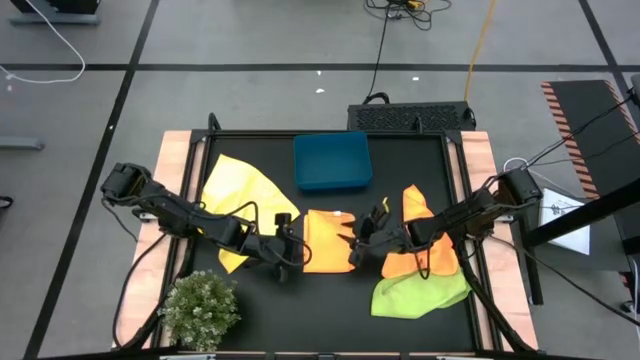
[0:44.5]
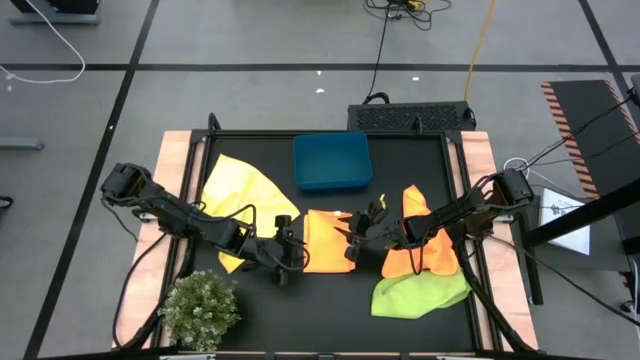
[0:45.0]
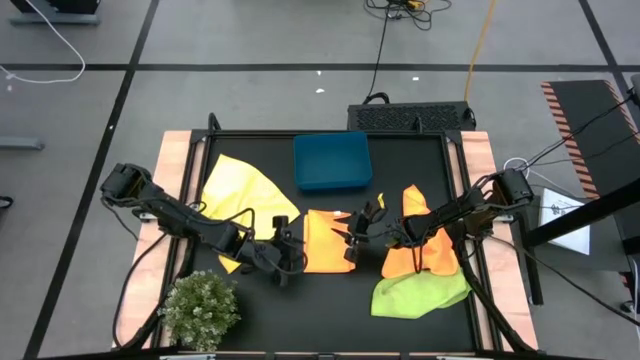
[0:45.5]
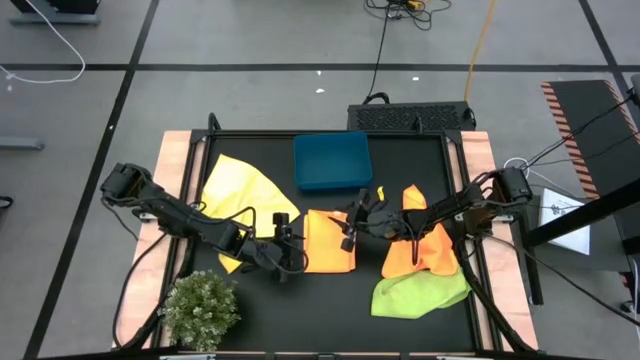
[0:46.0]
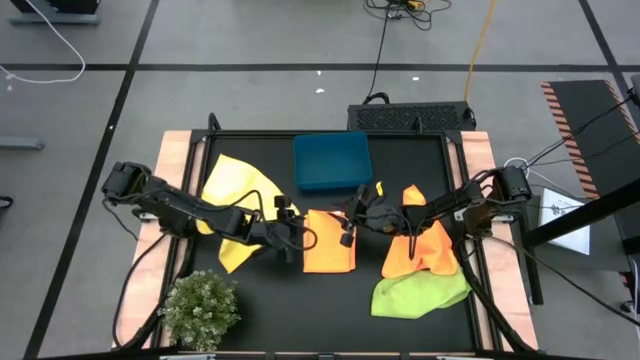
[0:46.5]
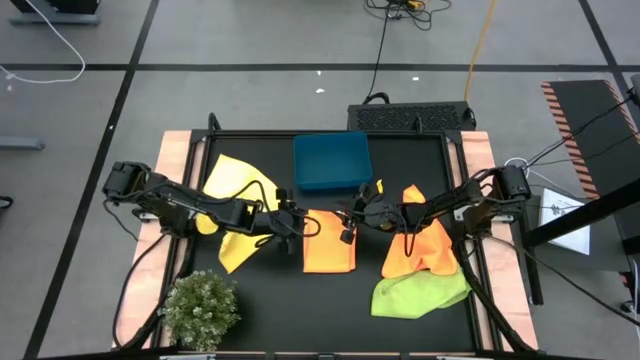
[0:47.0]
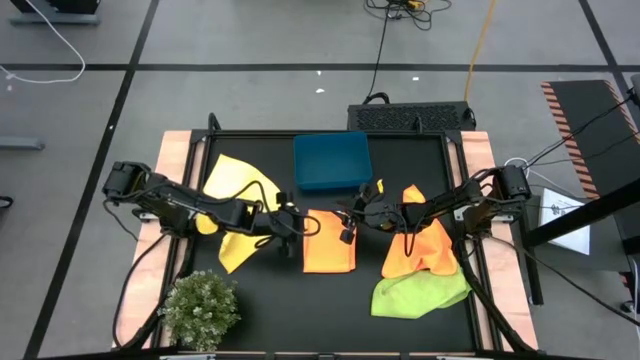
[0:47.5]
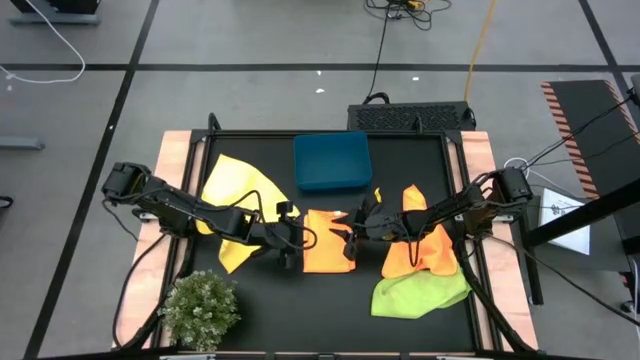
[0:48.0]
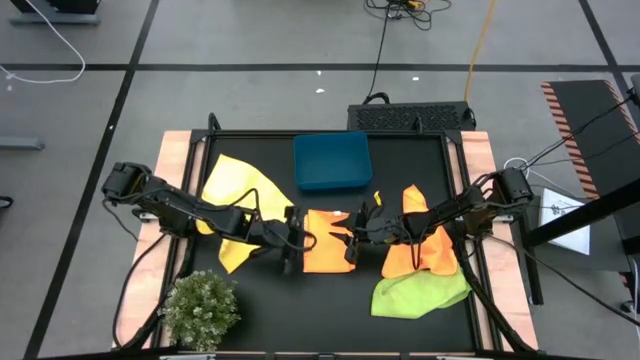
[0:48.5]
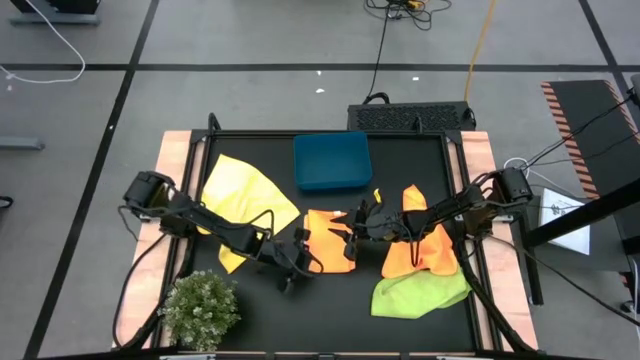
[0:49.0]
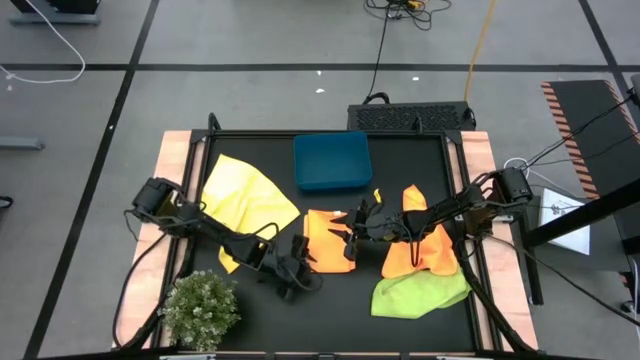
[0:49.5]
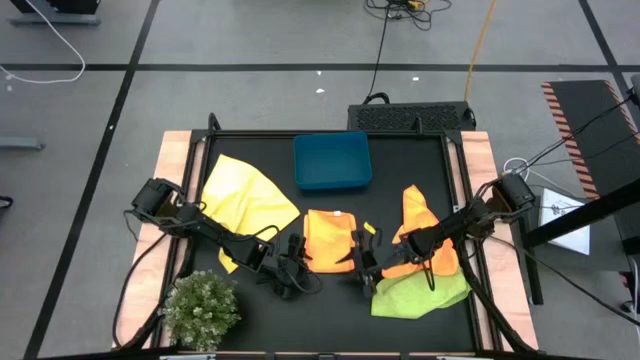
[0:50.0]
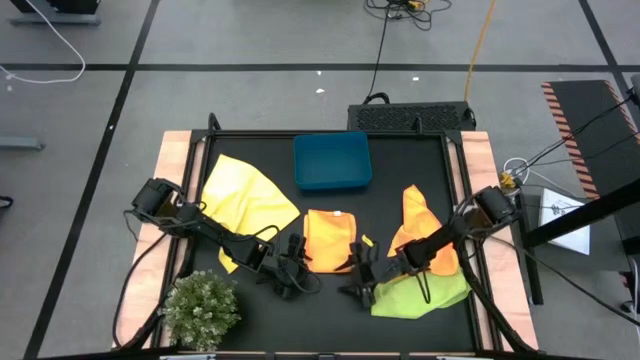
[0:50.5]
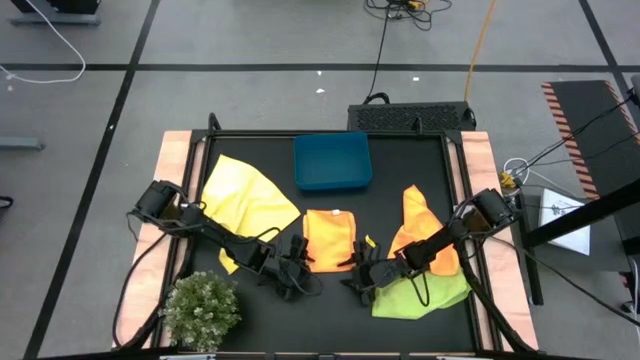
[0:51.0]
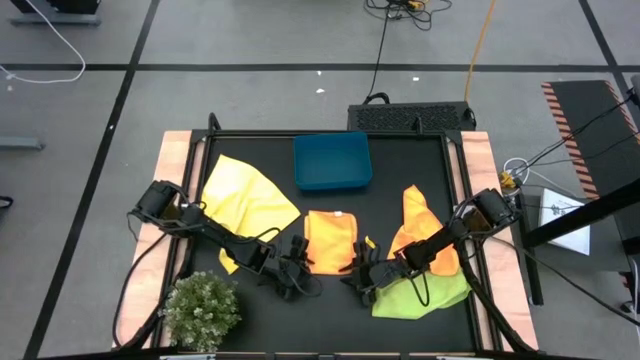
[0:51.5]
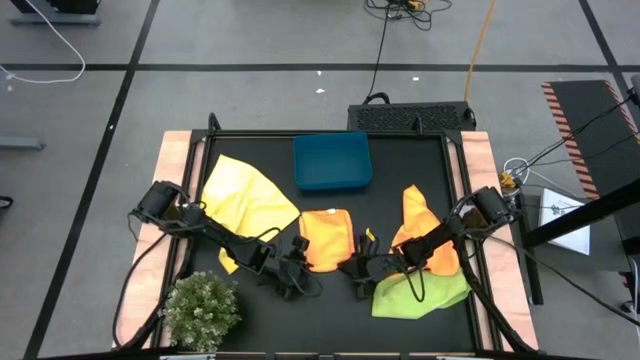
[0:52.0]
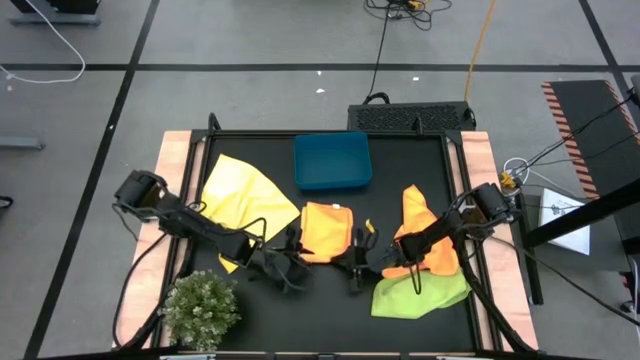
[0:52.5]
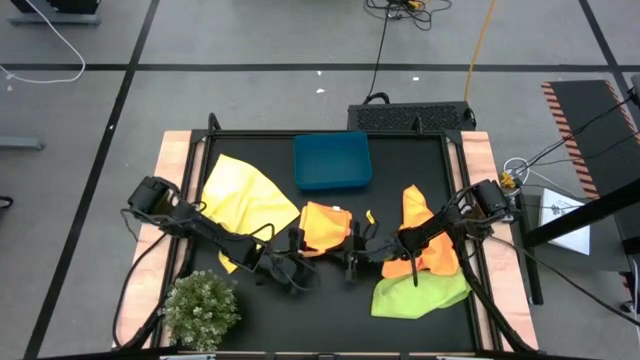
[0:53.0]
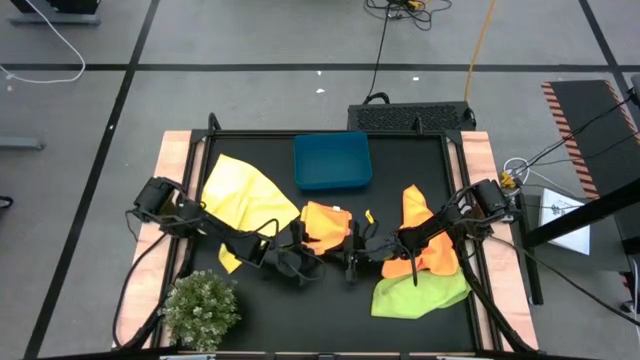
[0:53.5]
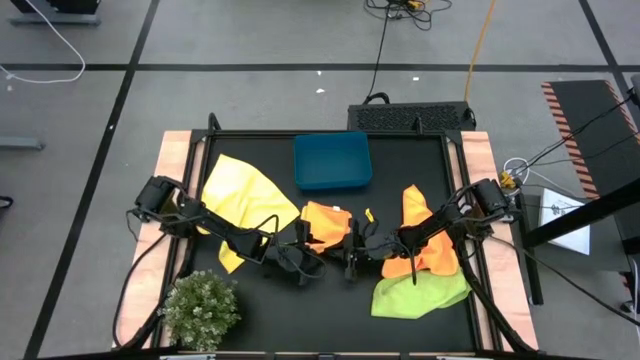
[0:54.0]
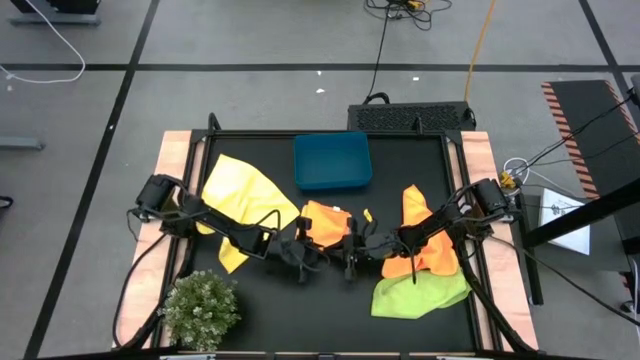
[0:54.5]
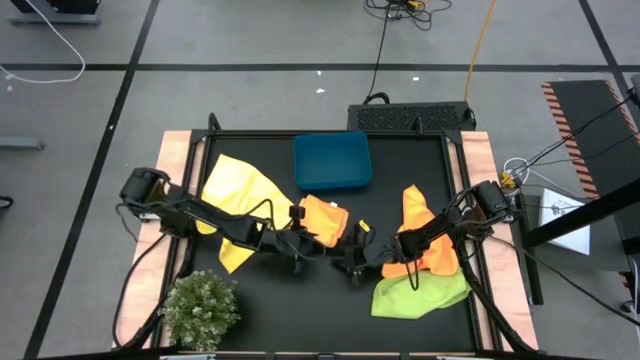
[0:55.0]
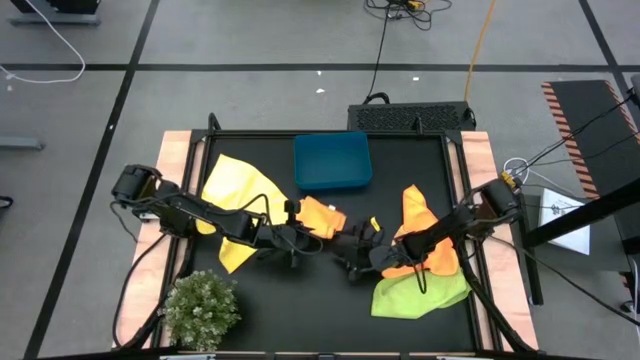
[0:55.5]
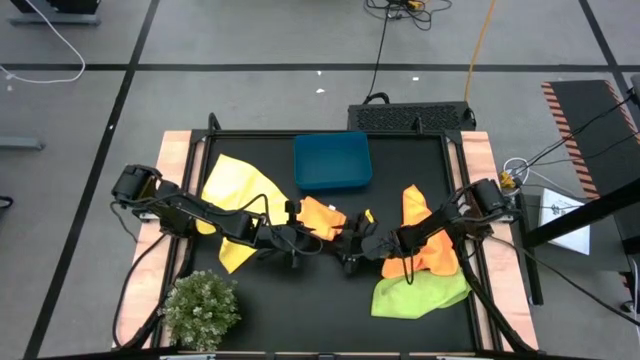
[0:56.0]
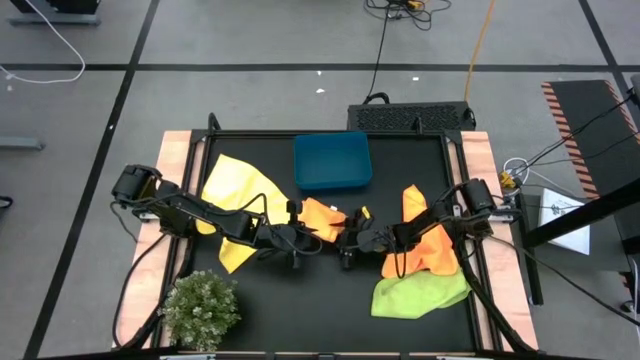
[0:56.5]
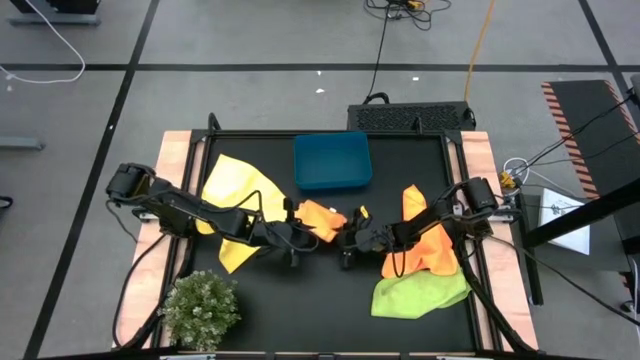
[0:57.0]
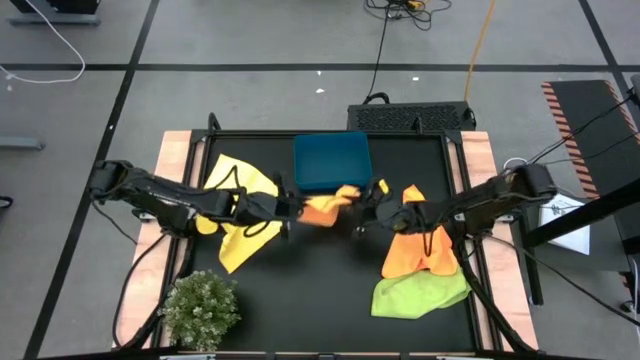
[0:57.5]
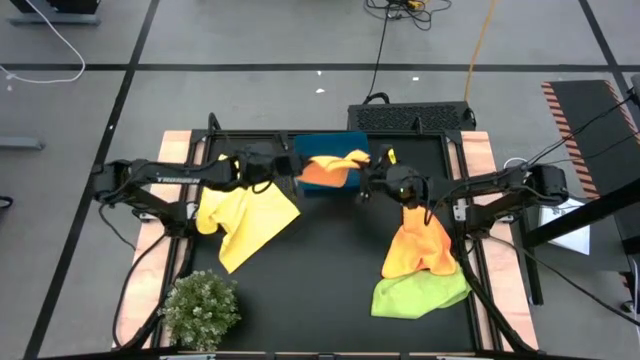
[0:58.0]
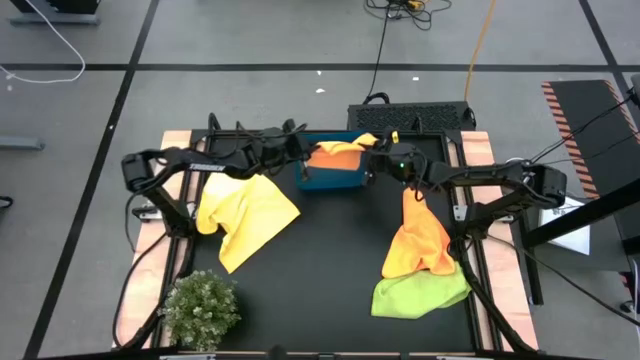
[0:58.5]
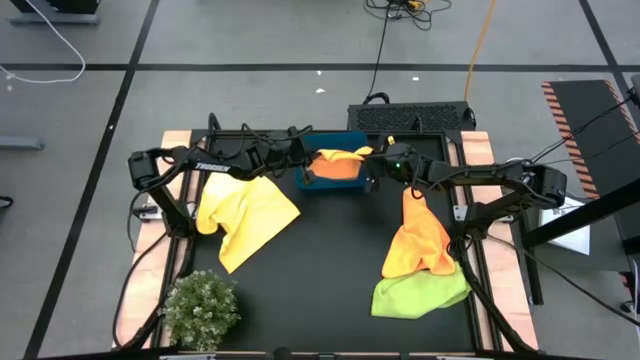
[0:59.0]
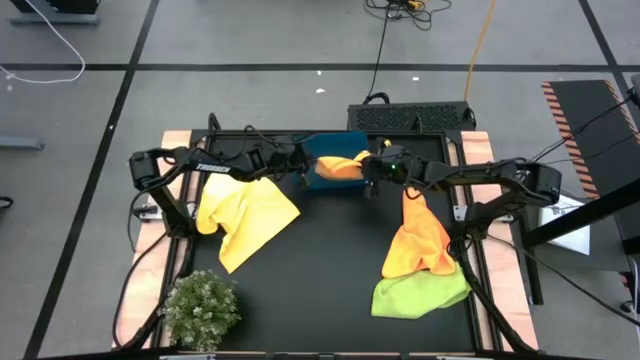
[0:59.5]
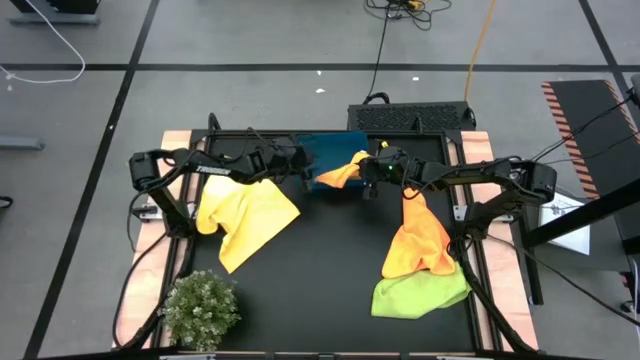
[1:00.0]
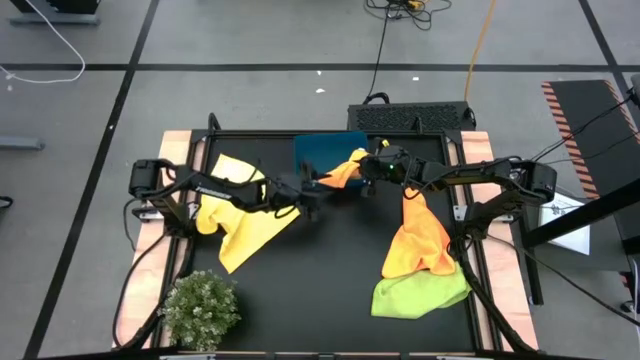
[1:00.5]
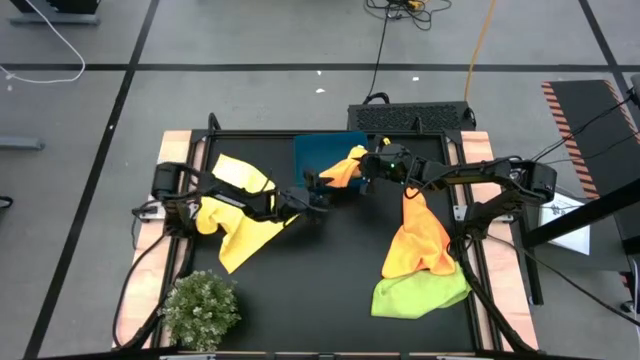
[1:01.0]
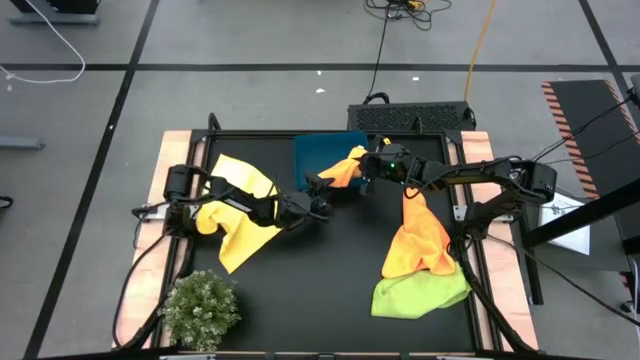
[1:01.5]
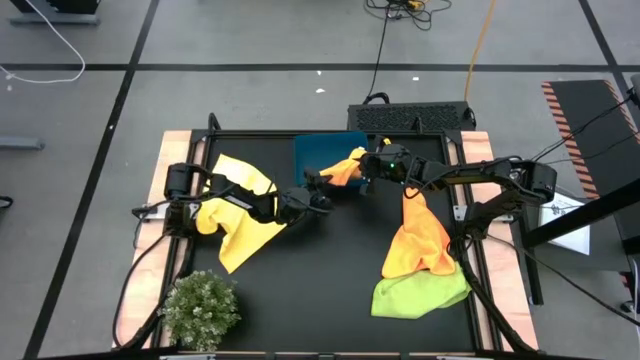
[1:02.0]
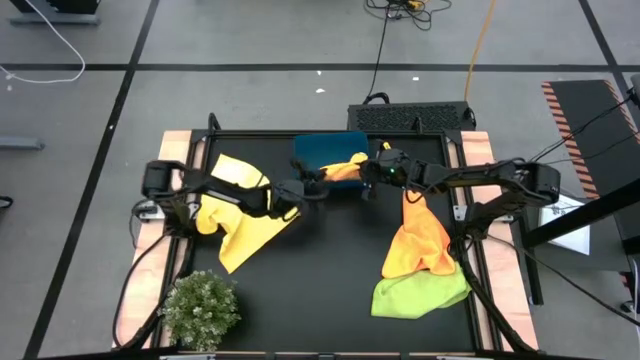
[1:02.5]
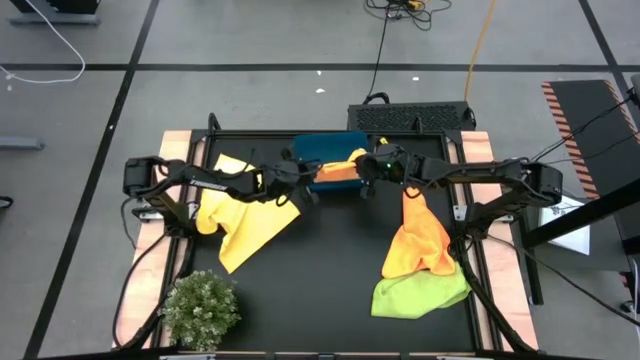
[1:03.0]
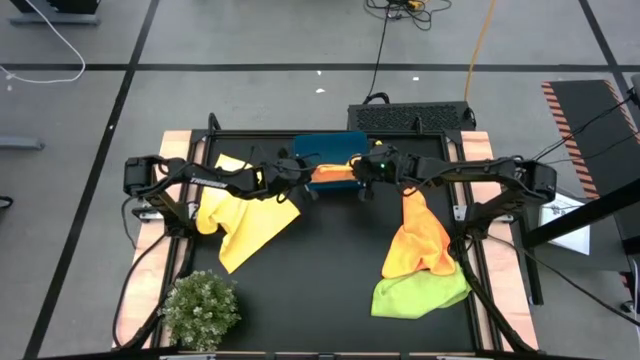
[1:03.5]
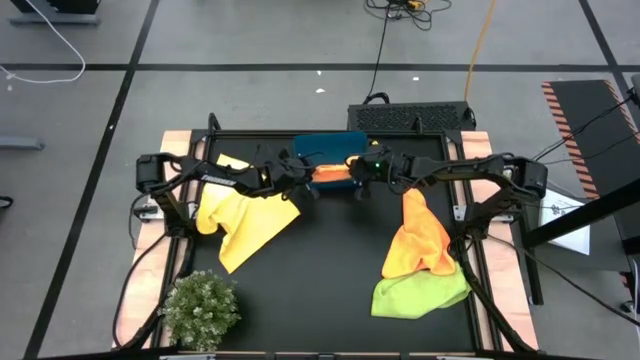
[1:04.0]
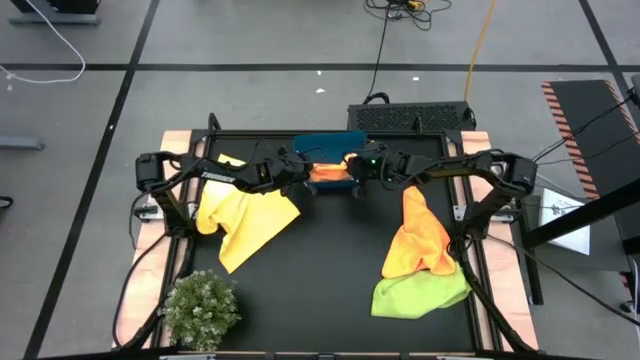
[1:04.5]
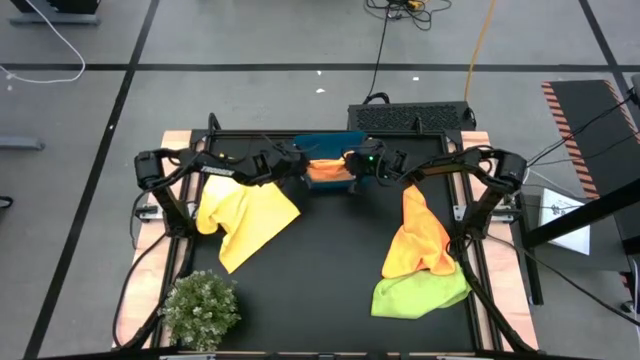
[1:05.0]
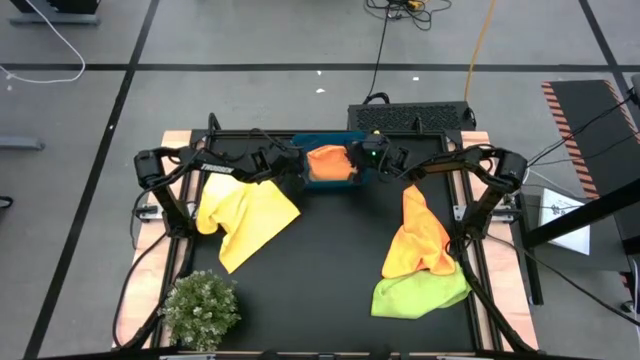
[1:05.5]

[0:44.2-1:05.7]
Task: Fold microfiber towels
Put the folded orange microfiber towel into the blue bin
